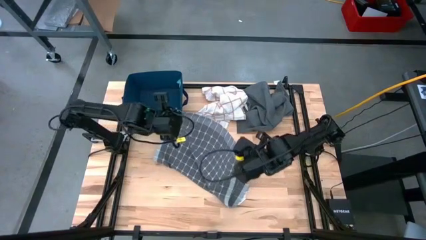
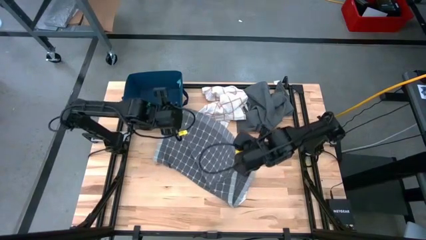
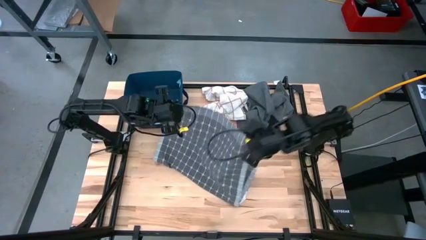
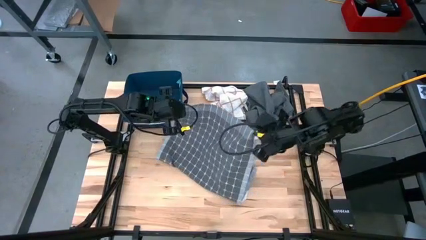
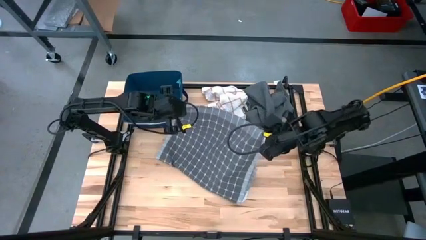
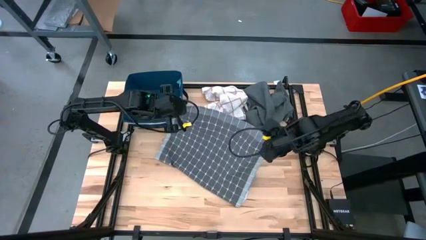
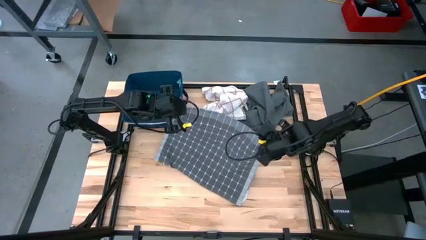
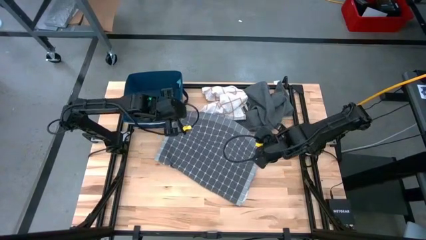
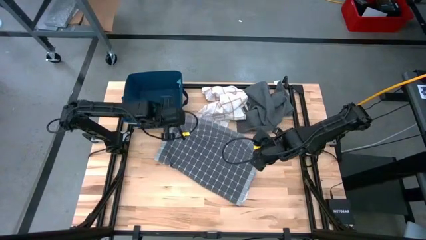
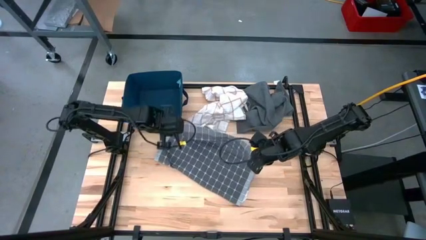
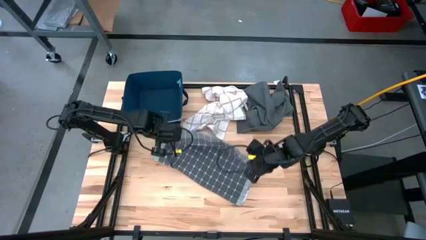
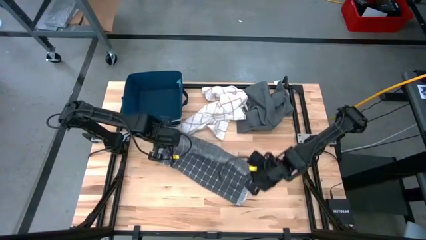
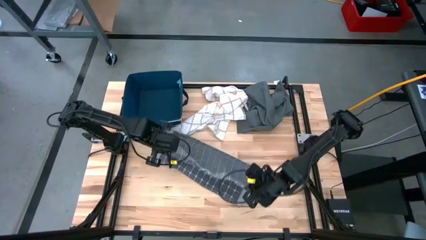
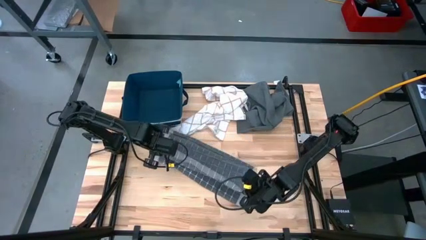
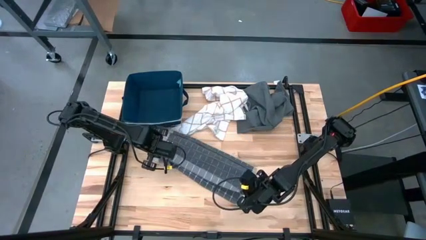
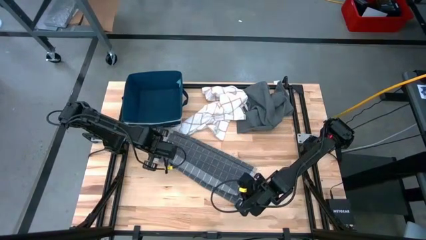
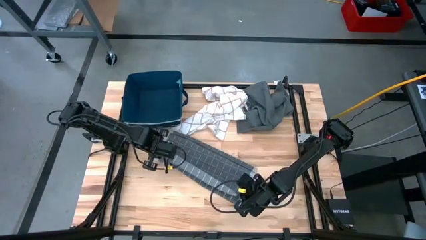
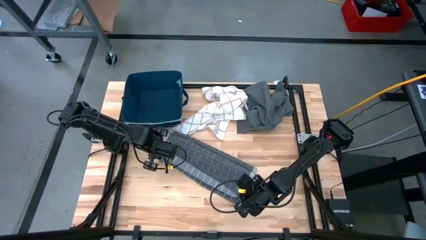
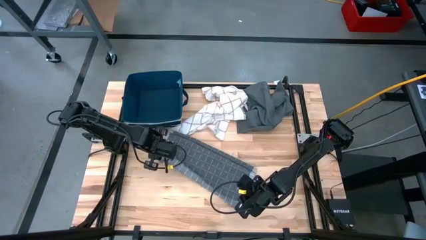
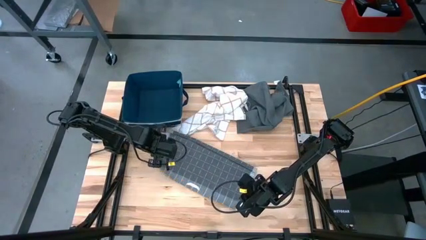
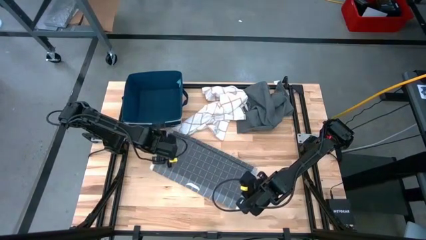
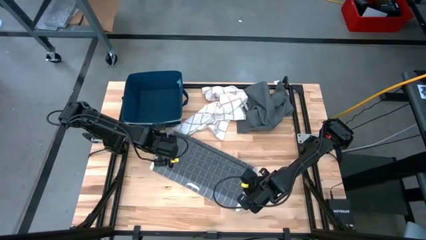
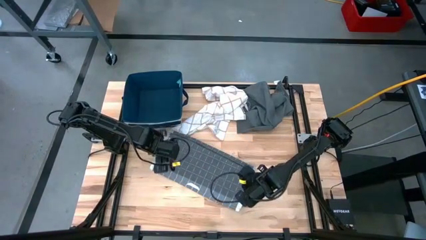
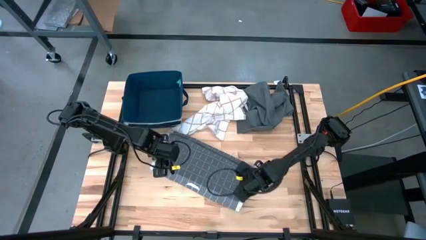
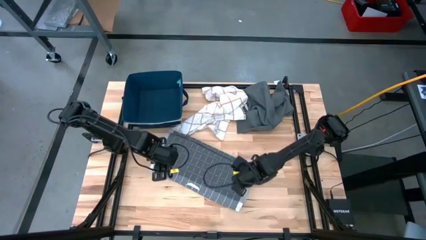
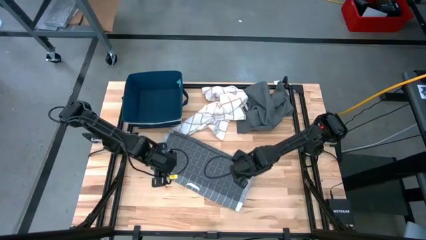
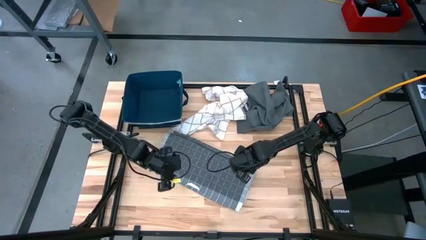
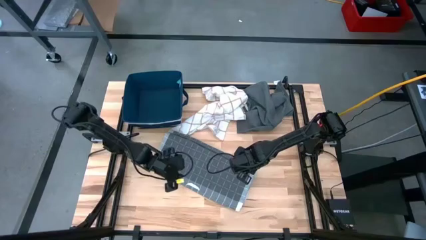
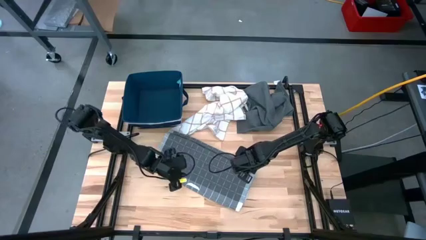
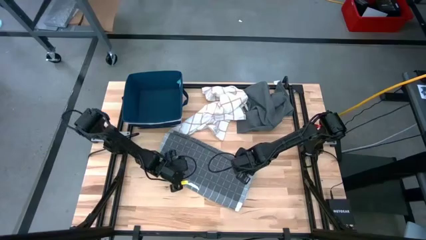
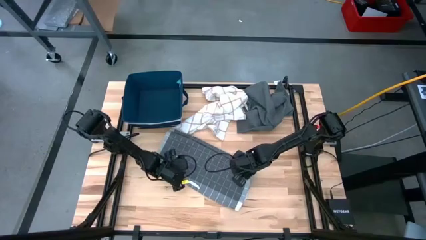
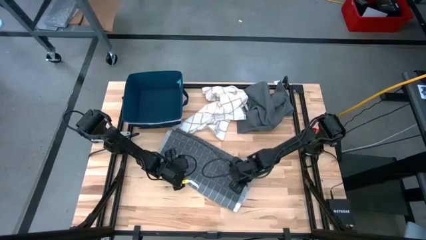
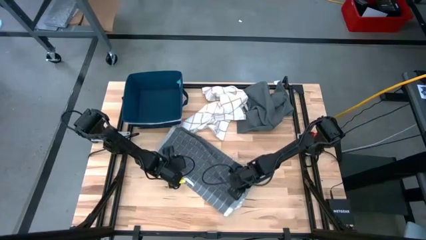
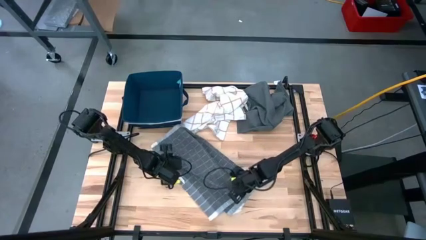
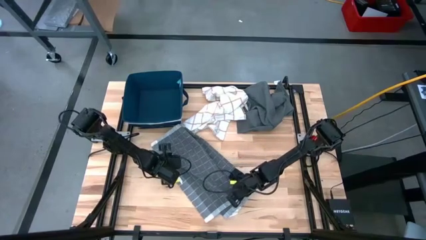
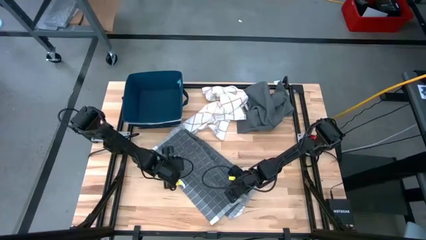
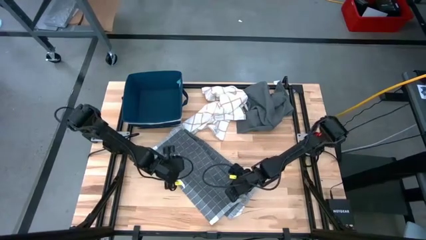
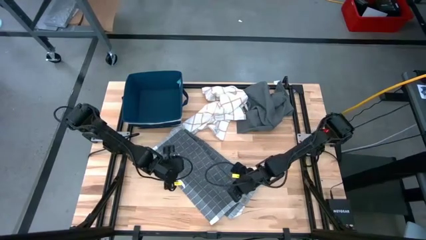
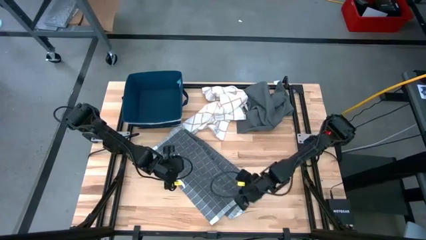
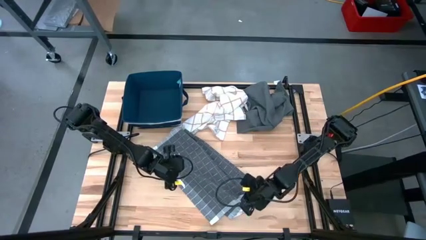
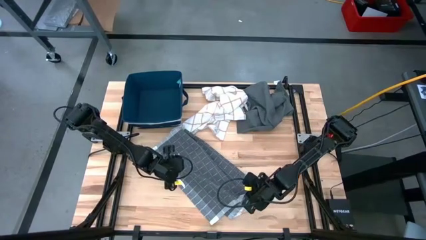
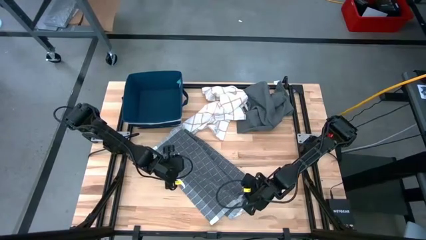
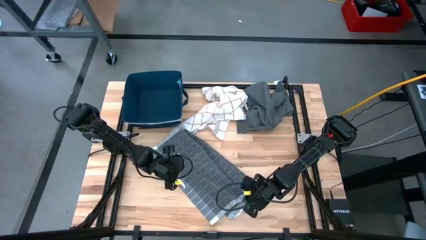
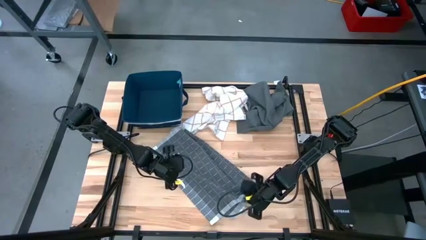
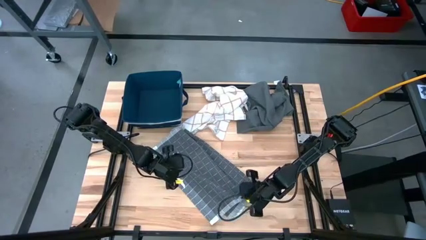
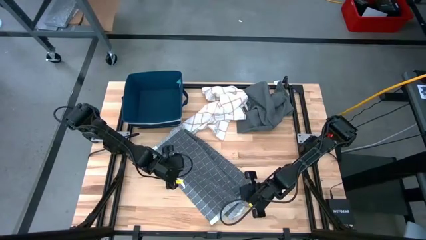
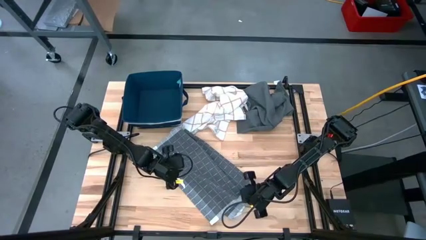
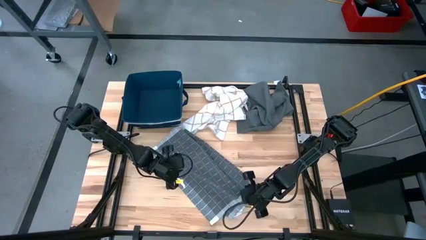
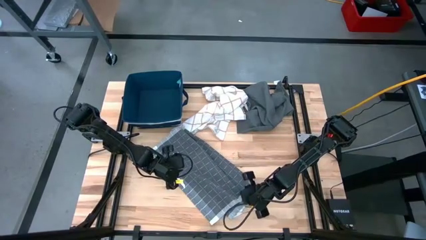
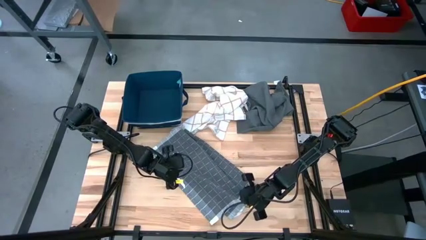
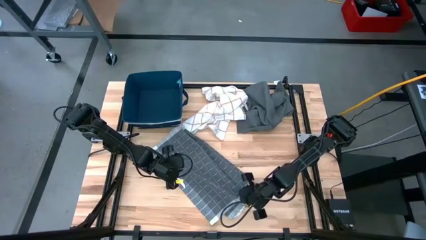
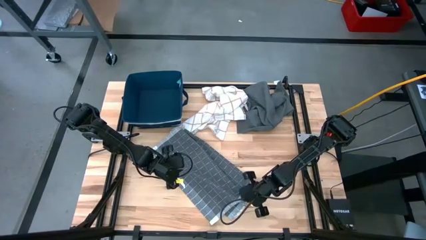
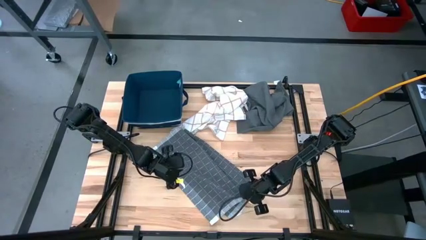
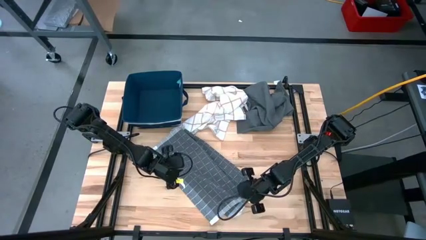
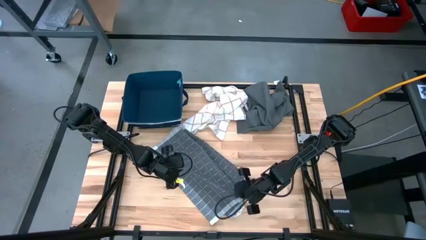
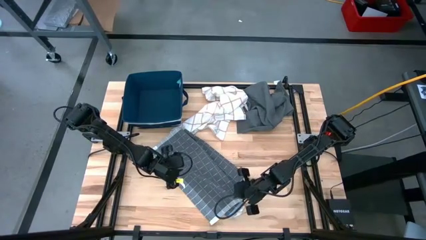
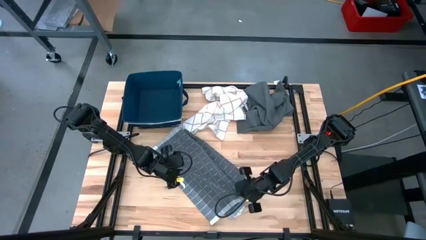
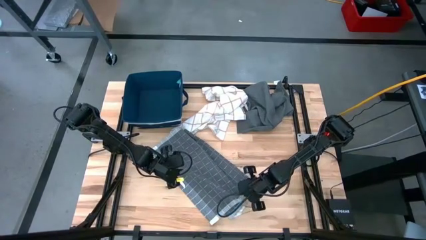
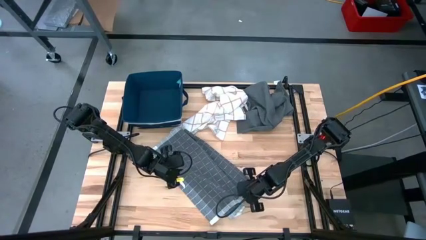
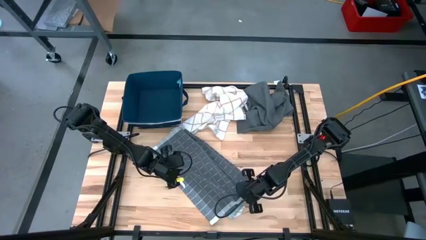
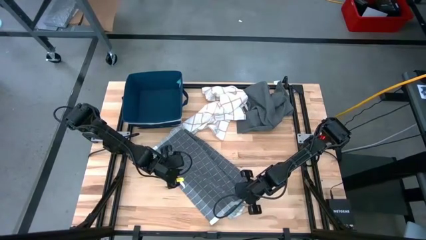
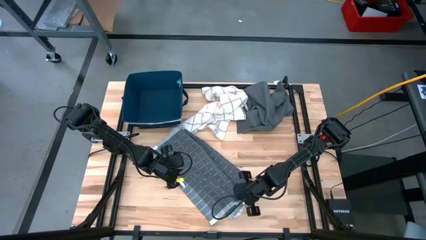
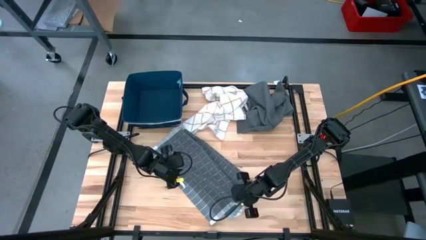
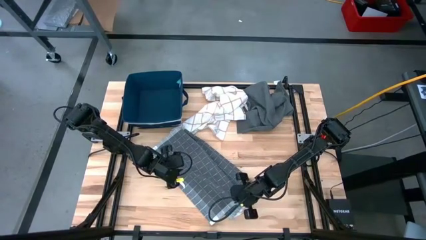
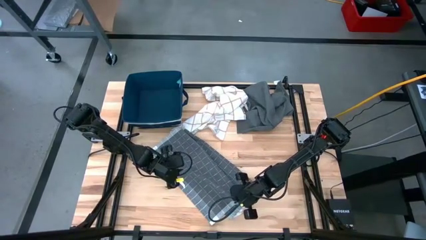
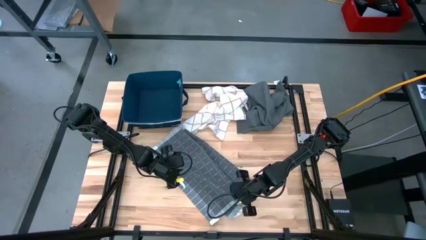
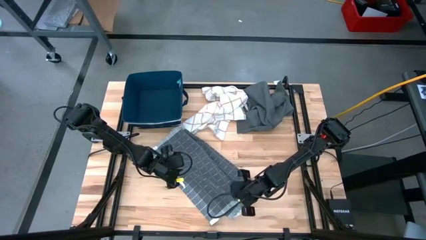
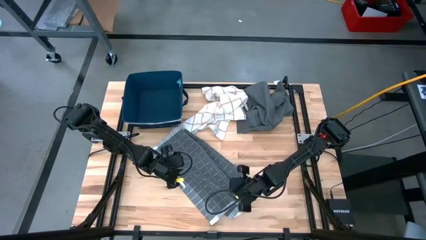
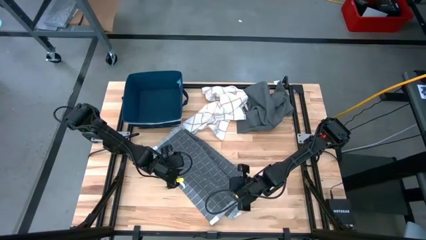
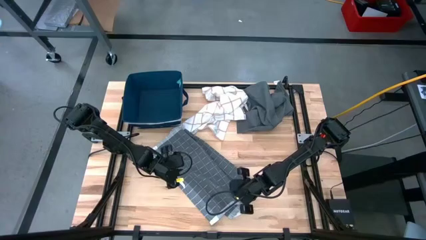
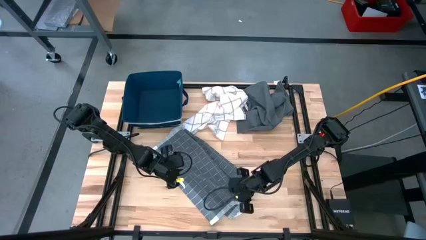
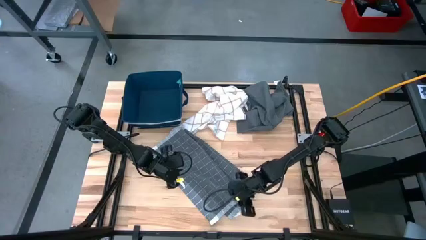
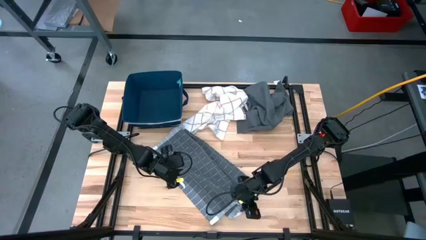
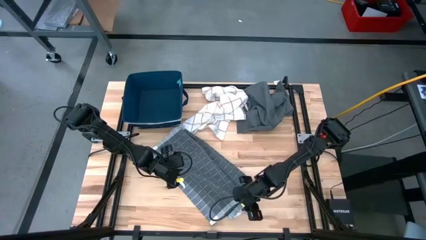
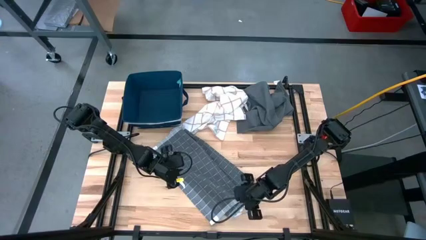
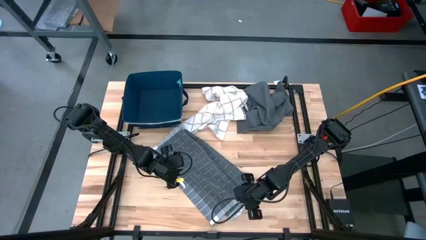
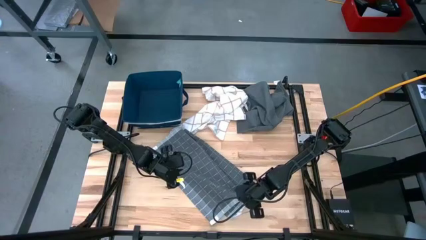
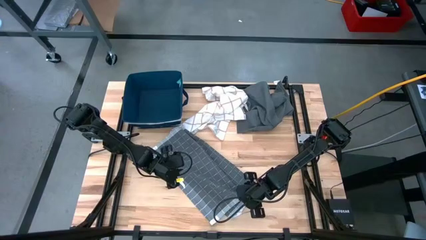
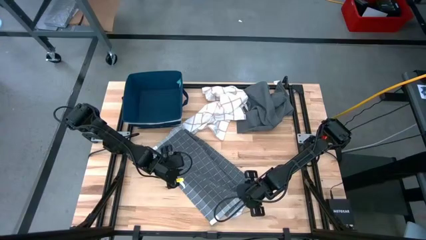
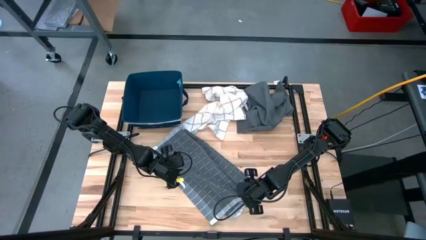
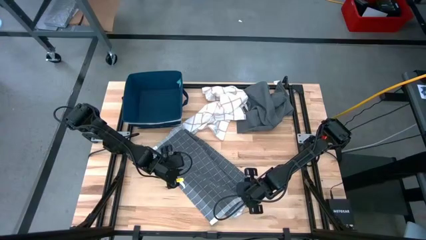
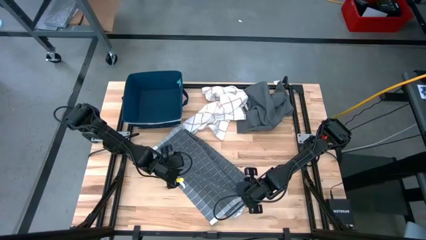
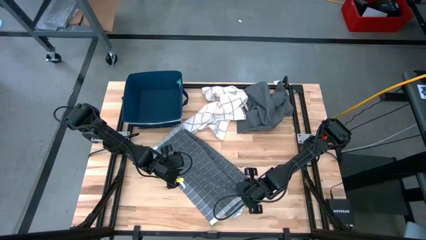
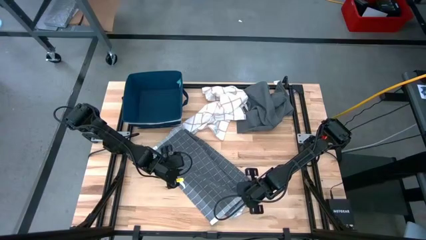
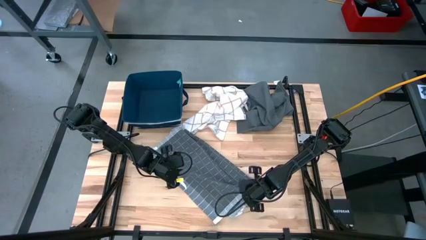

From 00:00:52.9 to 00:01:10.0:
Task: Fold towel
Fold the gray patterned towel
